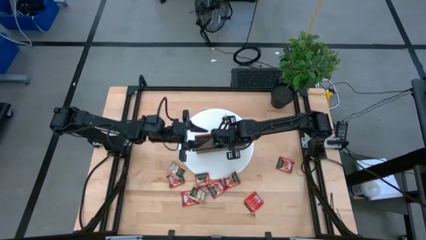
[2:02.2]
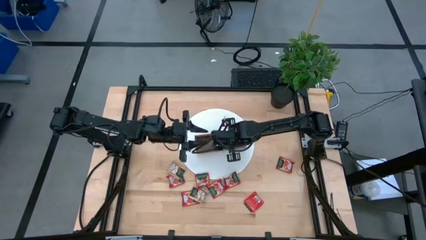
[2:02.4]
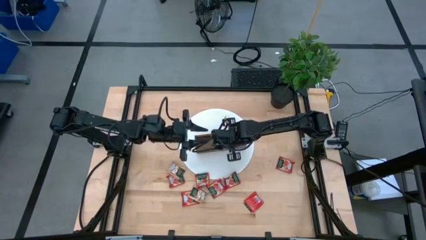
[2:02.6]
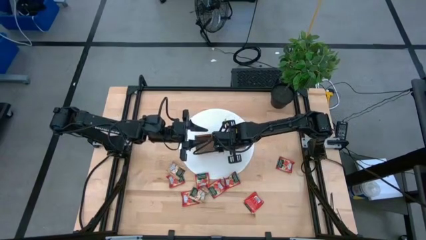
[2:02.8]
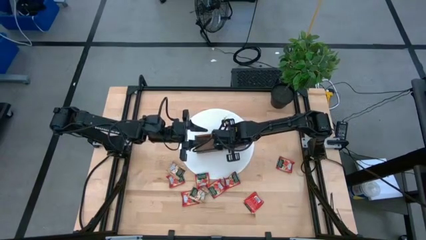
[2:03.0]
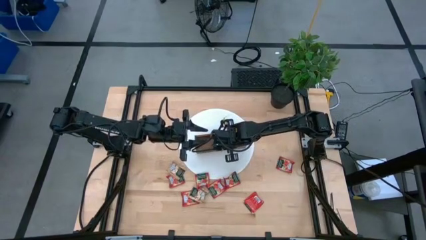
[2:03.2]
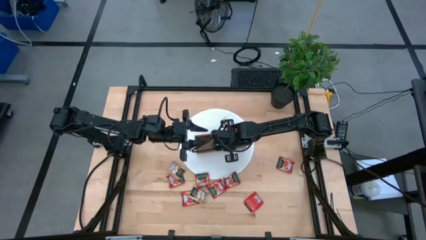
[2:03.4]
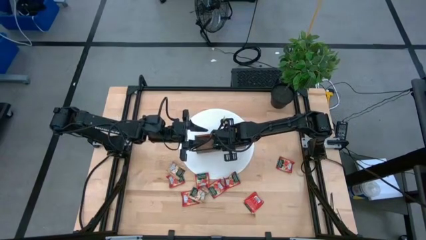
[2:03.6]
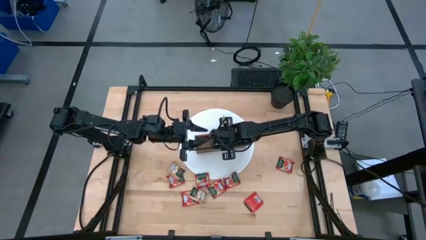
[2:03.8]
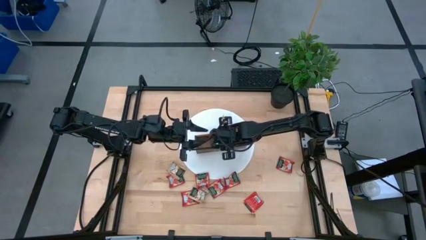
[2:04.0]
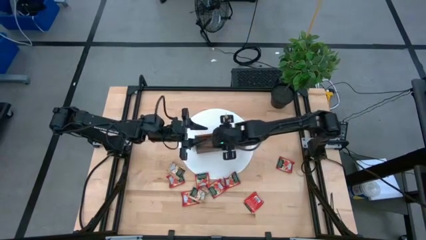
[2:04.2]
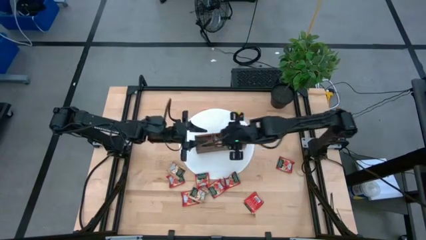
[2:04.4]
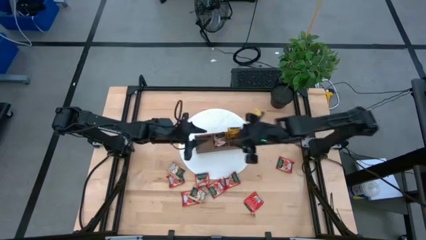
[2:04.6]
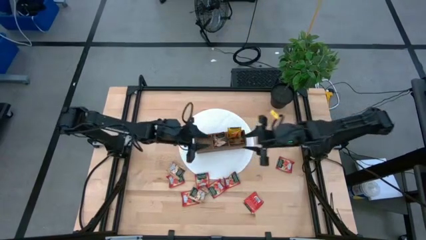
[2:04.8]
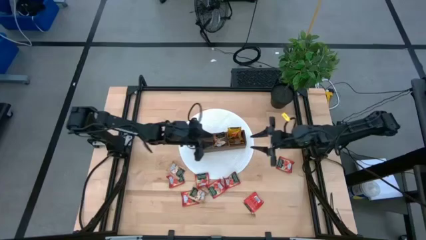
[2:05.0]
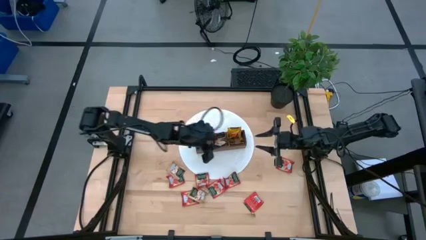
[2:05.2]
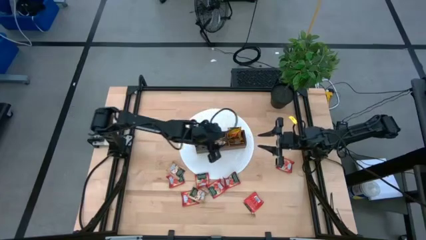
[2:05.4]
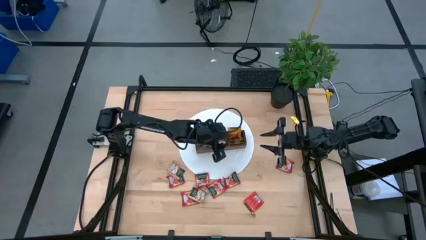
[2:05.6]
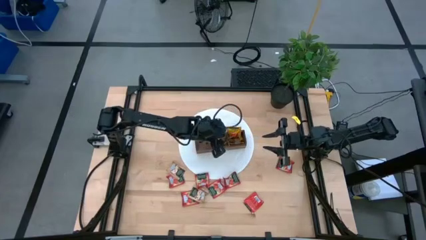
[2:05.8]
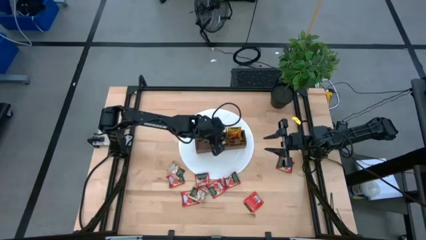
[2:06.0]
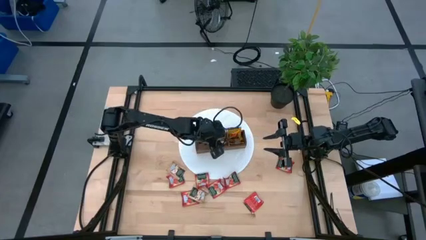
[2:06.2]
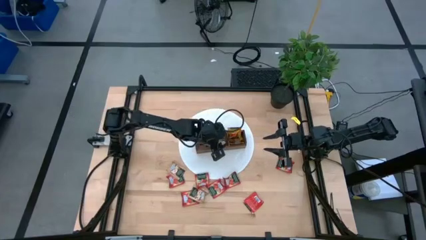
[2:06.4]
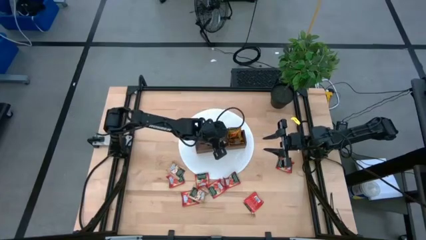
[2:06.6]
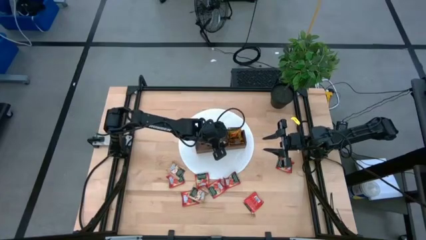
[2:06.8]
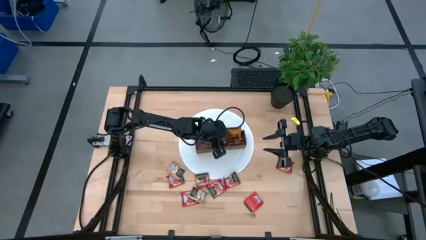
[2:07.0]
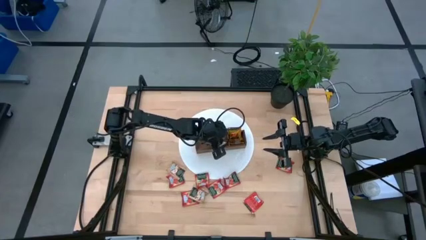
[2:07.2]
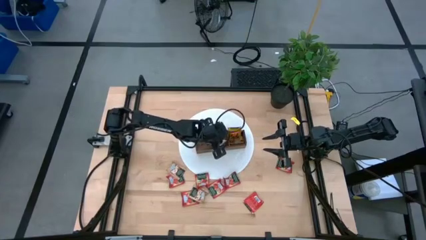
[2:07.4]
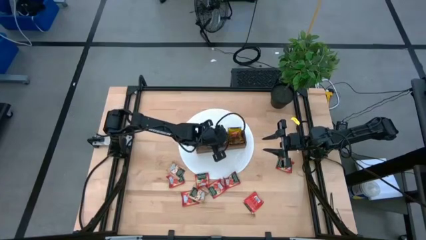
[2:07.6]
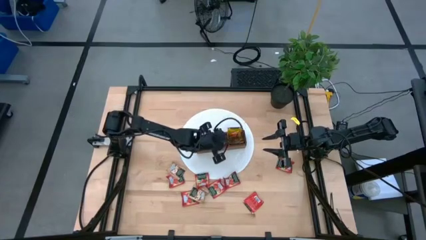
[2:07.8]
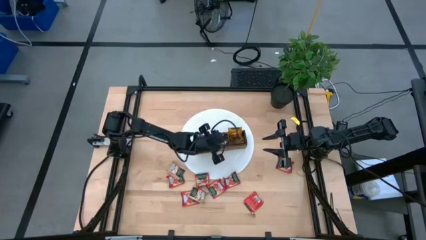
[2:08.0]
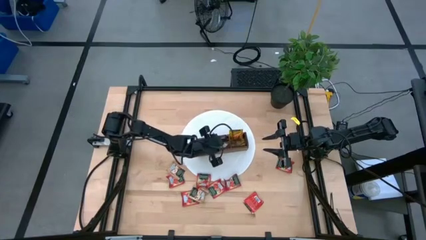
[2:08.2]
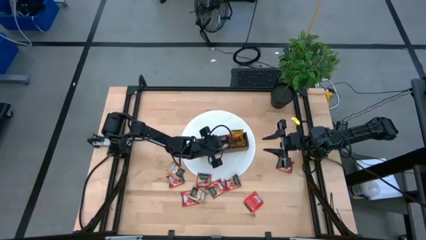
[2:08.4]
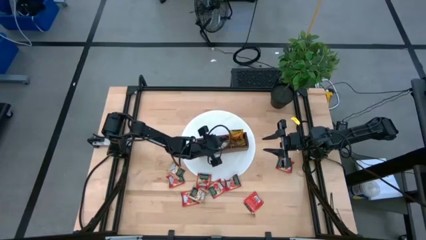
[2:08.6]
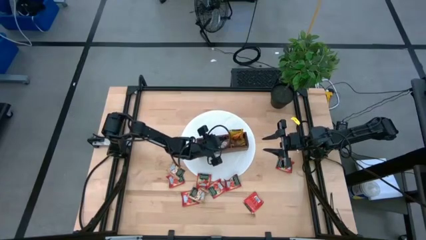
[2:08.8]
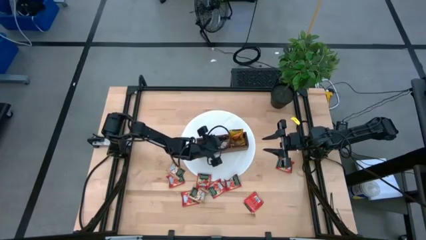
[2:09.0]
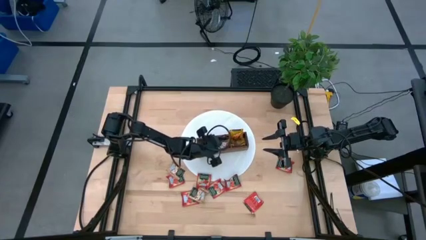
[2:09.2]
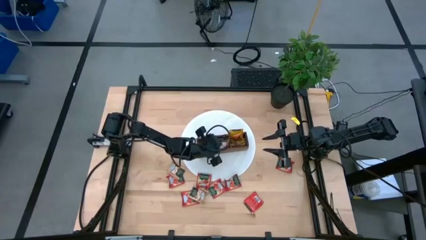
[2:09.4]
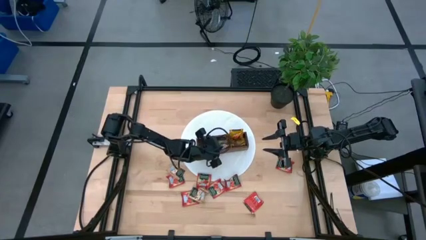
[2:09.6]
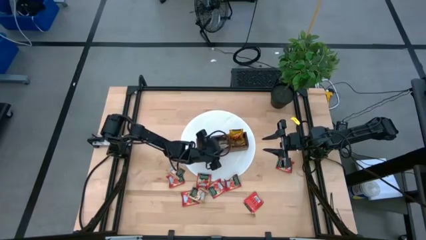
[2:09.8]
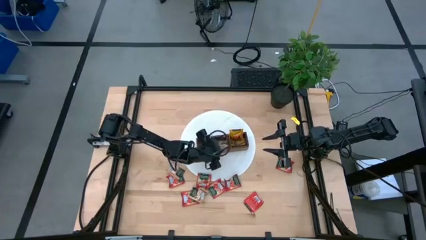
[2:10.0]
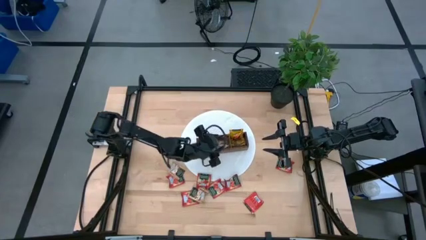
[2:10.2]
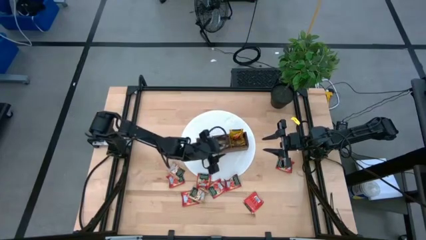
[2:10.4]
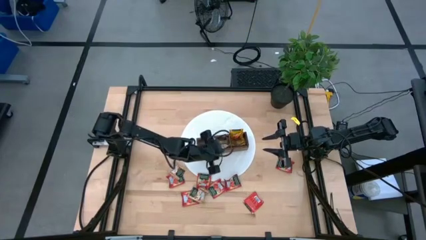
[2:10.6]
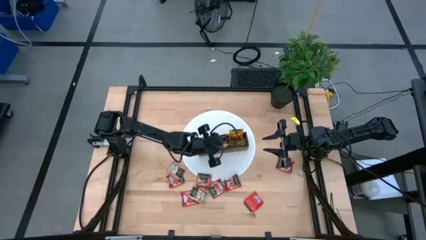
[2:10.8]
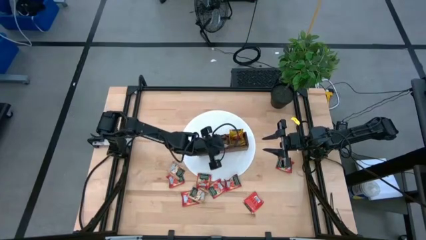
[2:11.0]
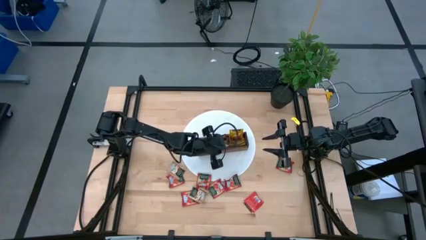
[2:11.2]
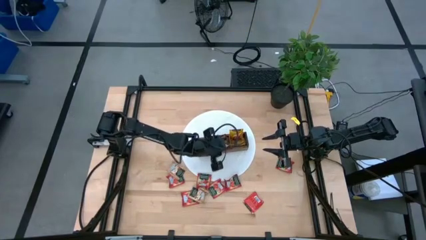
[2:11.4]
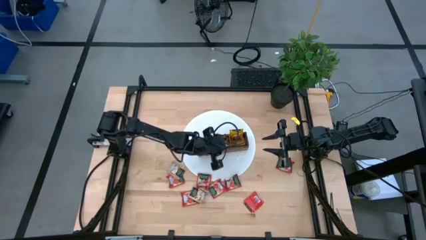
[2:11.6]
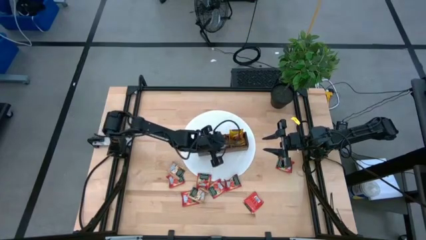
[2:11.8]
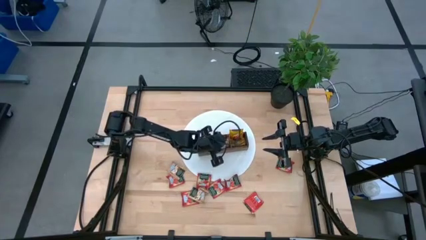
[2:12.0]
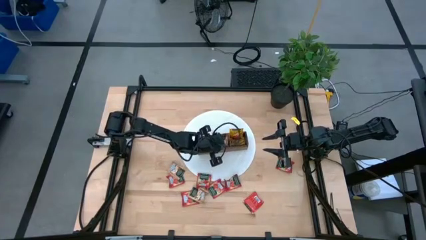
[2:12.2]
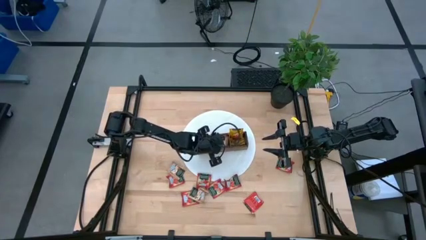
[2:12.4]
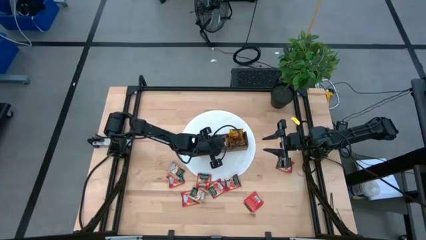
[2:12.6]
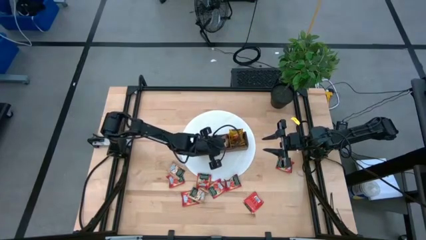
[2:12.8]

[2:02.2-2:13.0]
Task: Pick & Place Tea
Put the brown tea bag into the middle section of the wooden organizer

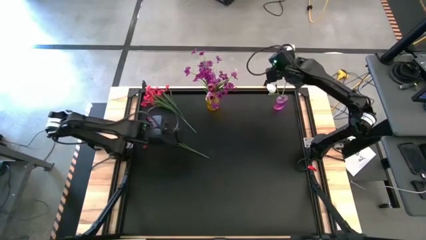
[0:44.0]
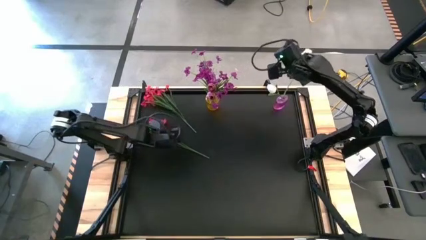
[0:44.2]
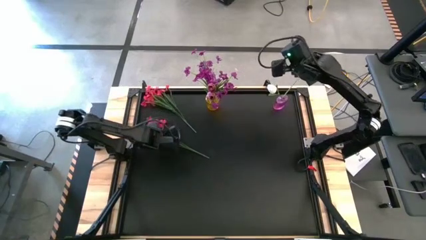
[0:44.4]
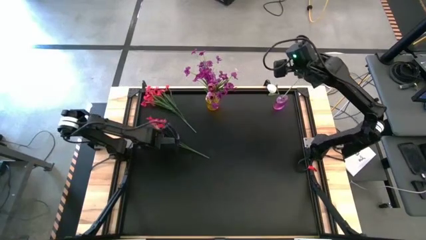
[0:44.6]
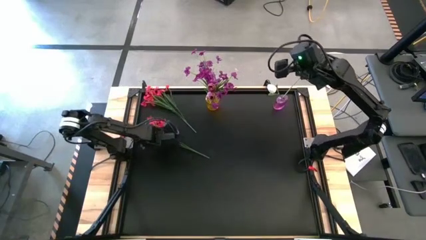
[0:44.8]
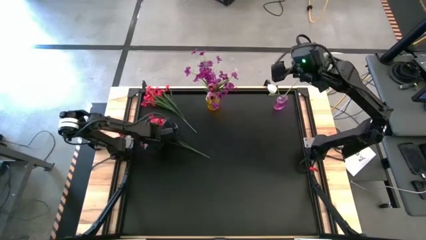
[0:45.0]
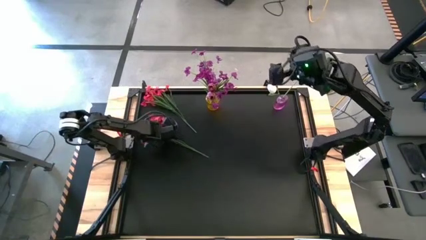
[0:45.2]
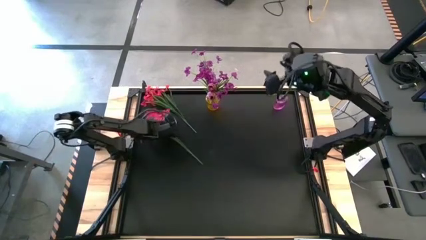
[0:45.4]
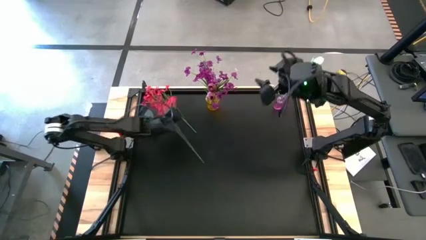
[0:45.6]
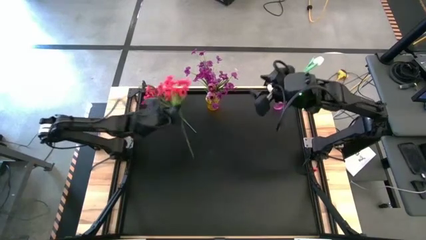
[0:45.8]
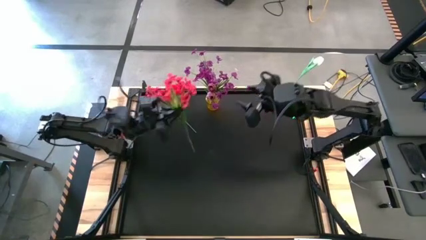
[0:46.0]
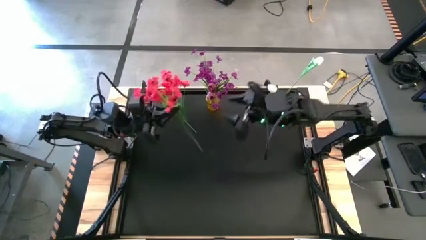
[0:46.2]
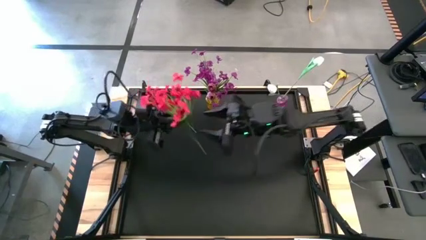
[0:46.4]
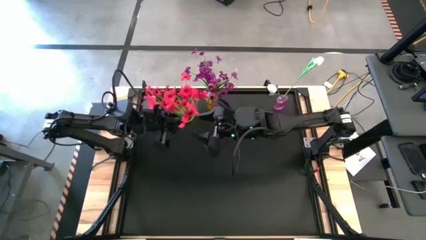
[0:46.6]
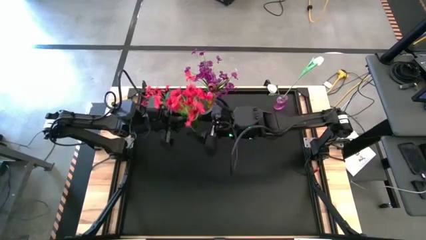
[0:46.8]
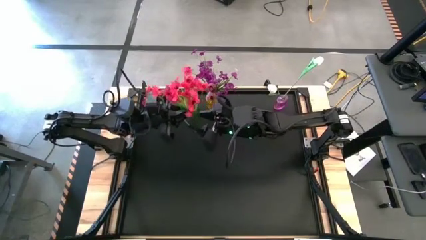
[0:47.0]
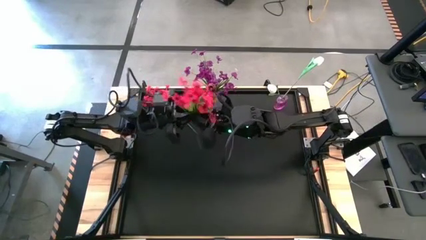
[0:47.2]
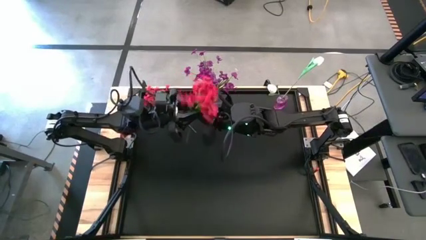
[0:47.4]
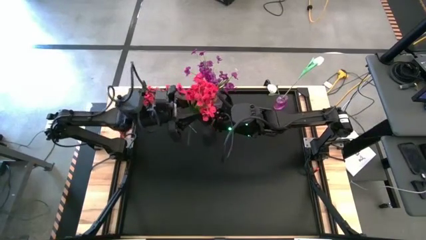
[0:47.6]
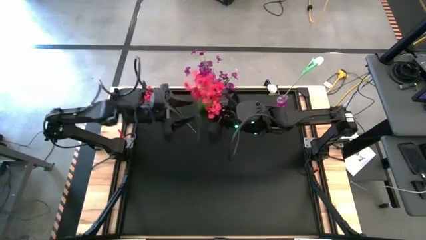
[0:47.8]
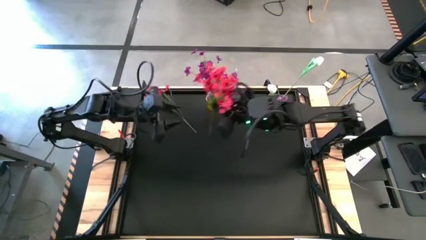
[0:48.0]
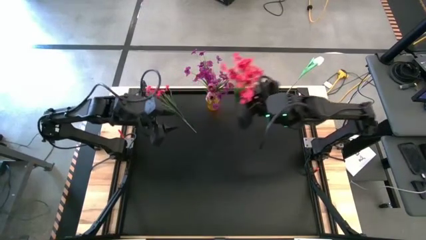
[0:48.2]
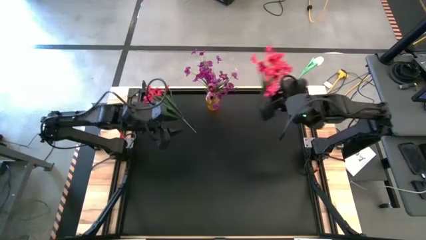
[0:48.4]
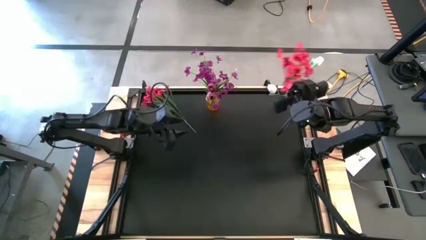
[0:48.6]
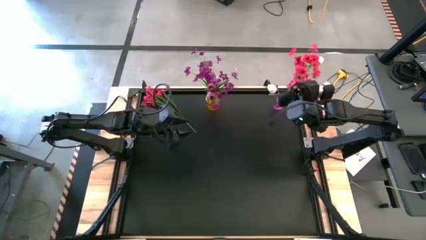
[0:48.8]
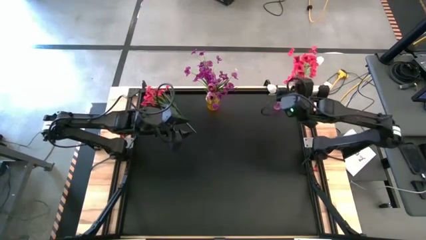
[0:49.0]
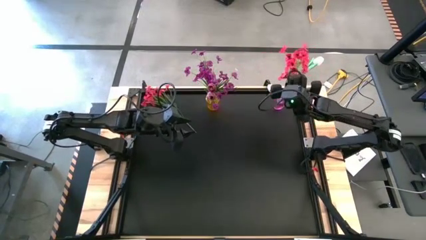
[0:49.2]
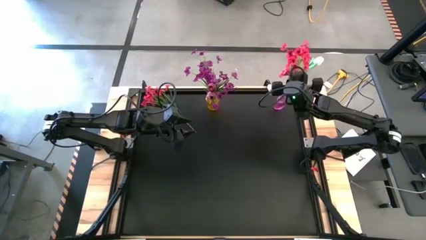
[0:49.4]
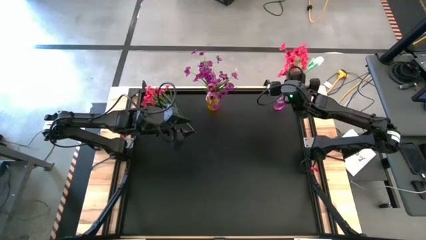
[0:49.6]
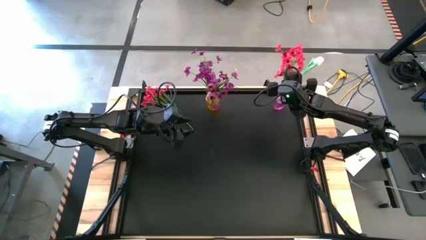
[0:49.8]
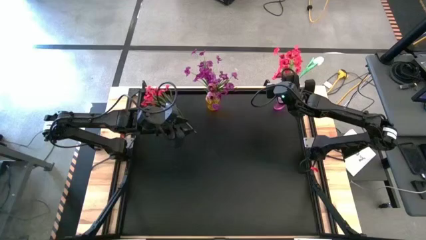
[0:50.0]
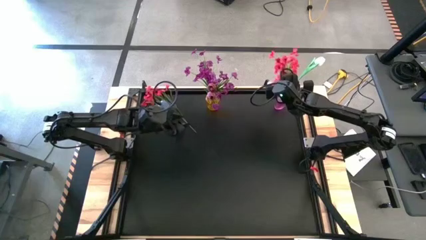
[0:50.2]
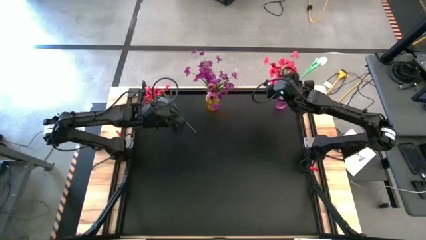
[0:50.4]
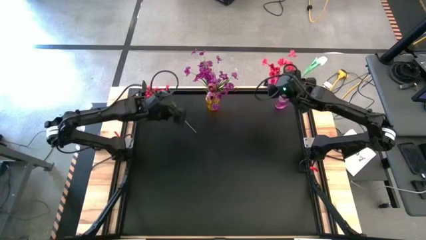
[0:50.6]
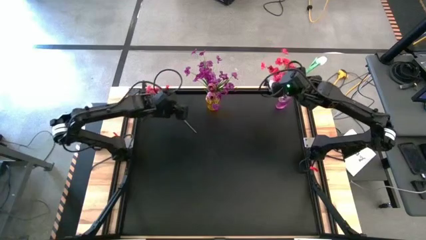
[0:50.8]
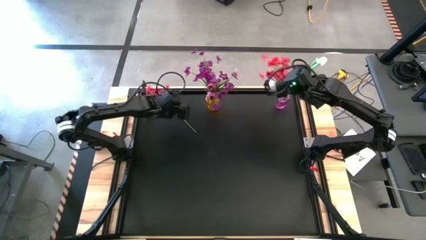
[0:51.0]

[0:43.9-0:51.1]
Task: Sort flowers into vase by color
Put the bottom red flowers into the violet flower vase
